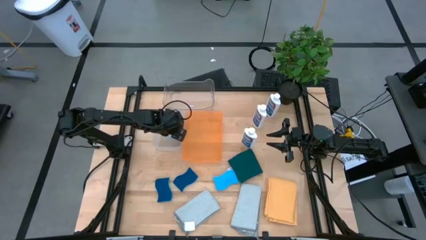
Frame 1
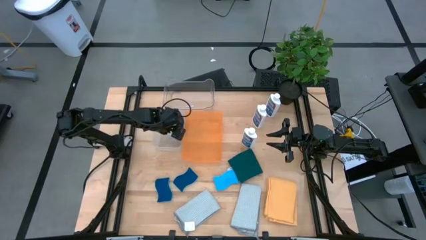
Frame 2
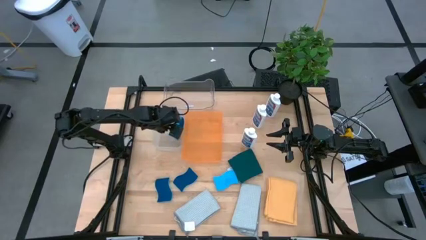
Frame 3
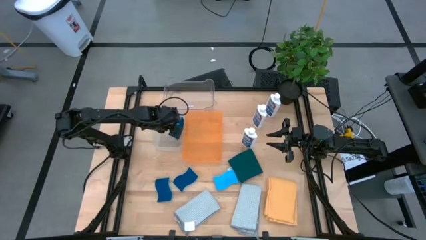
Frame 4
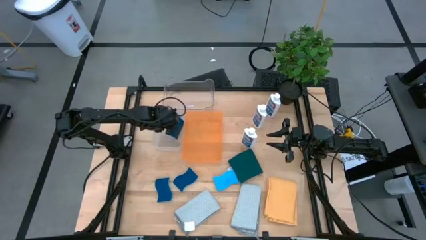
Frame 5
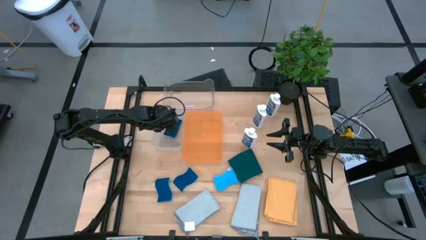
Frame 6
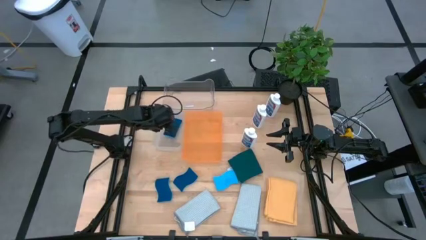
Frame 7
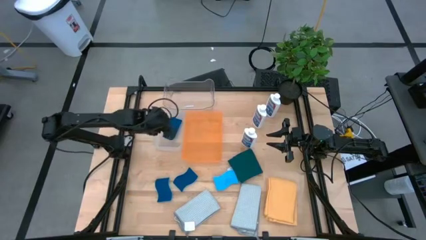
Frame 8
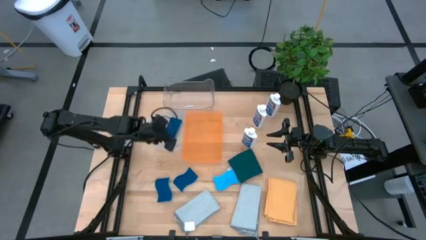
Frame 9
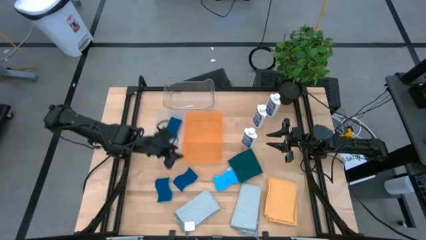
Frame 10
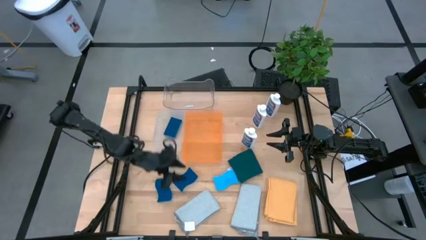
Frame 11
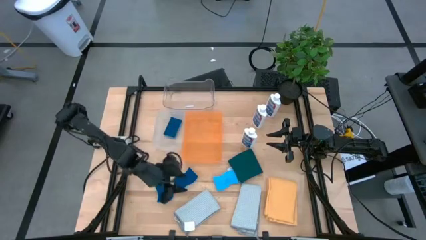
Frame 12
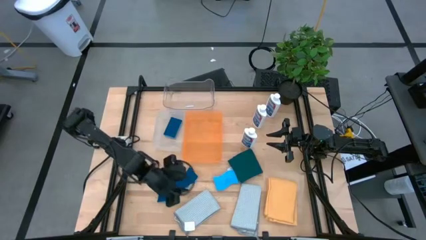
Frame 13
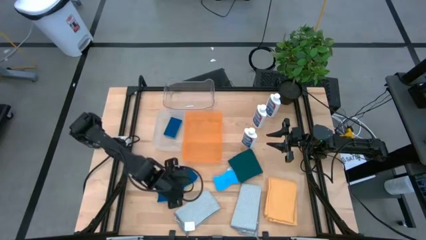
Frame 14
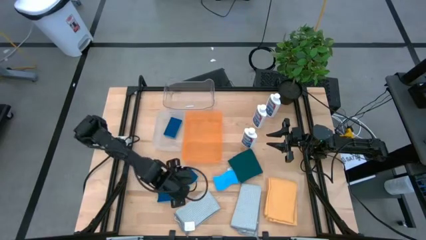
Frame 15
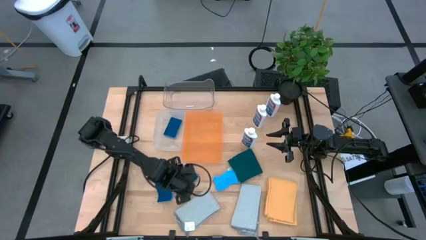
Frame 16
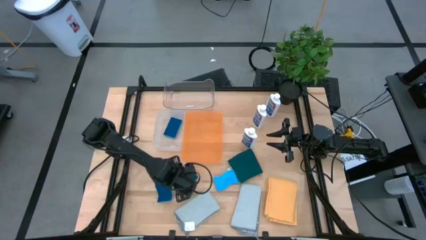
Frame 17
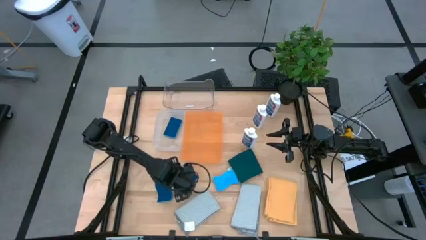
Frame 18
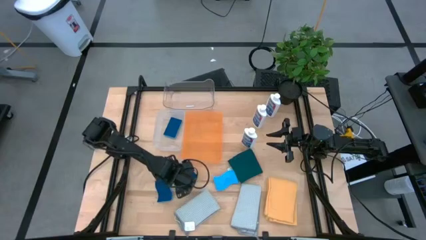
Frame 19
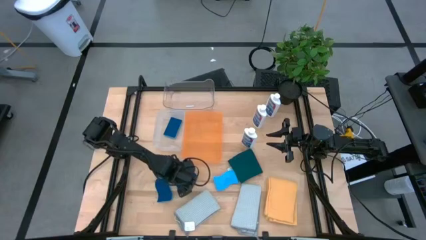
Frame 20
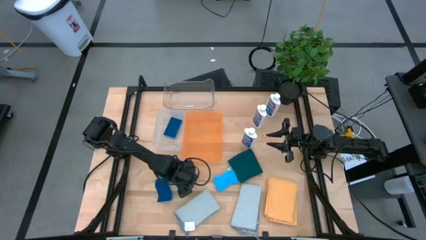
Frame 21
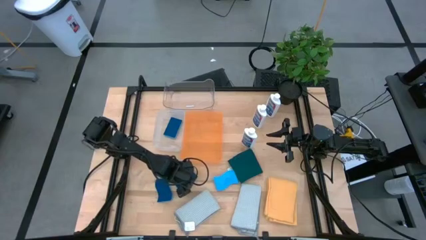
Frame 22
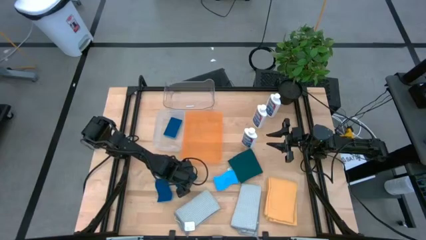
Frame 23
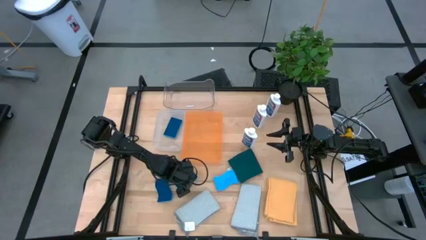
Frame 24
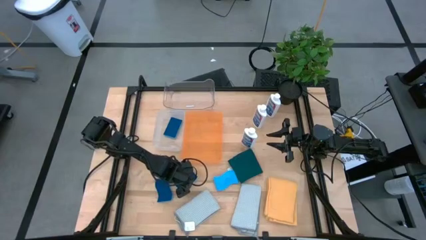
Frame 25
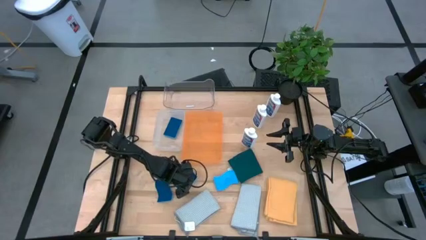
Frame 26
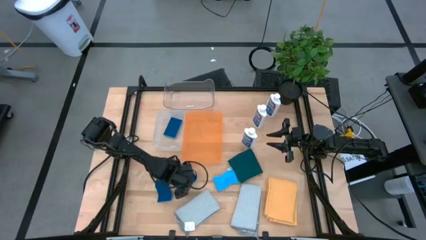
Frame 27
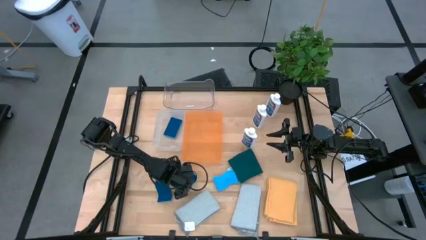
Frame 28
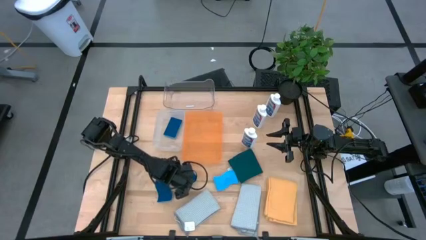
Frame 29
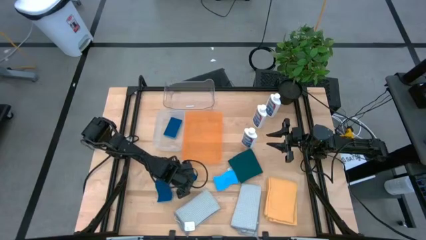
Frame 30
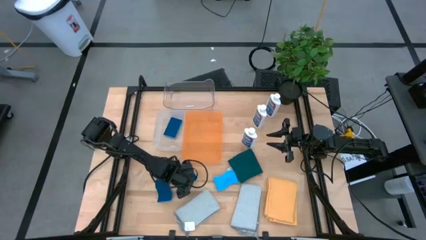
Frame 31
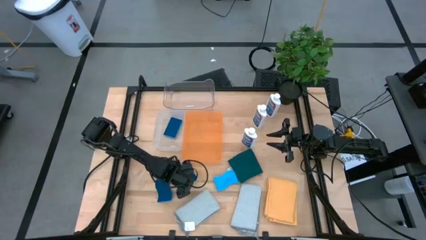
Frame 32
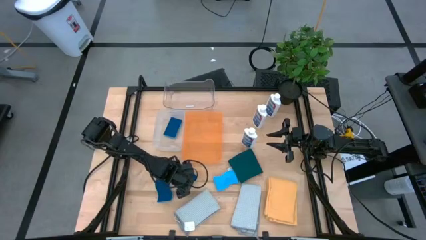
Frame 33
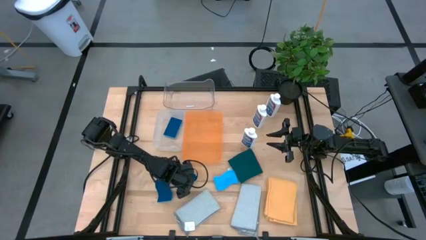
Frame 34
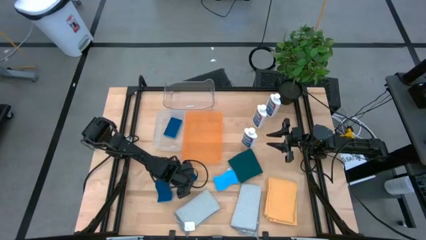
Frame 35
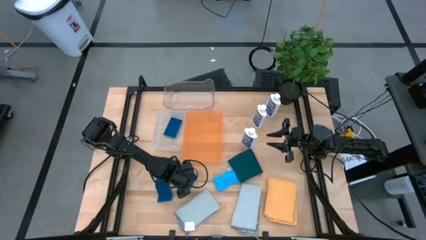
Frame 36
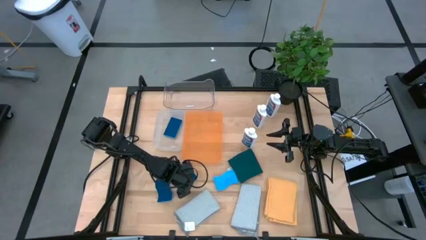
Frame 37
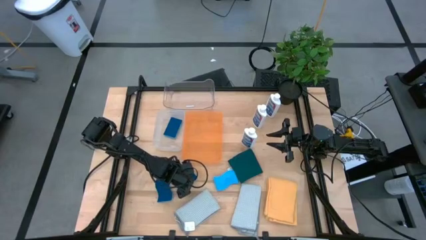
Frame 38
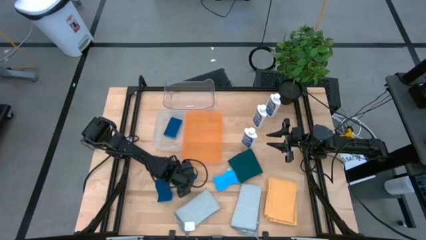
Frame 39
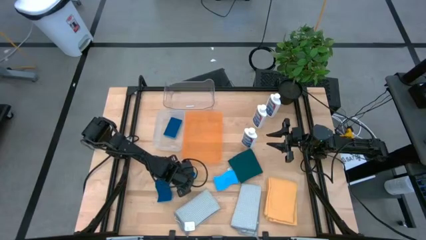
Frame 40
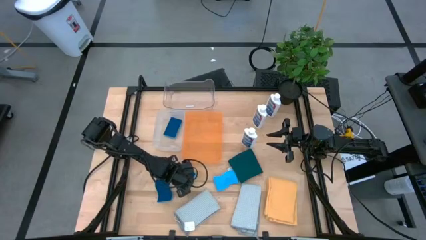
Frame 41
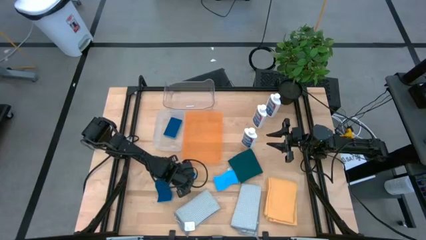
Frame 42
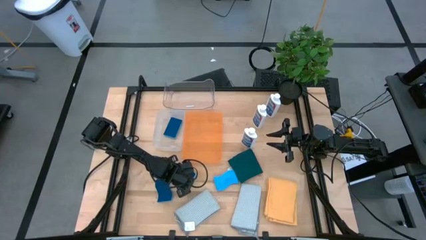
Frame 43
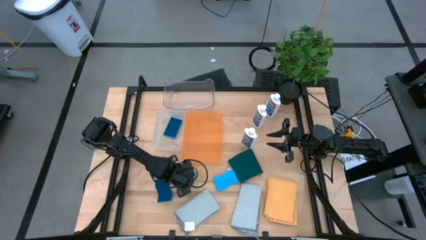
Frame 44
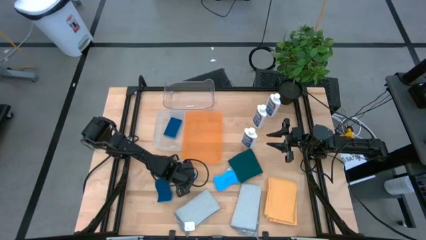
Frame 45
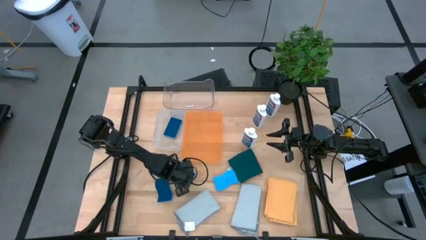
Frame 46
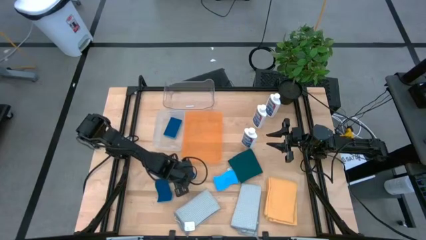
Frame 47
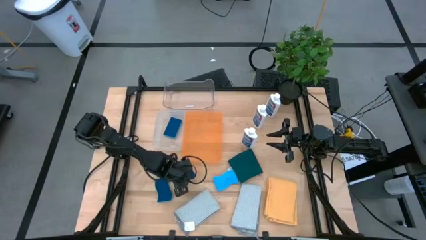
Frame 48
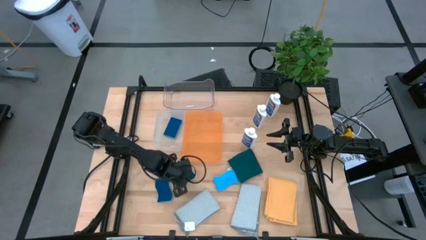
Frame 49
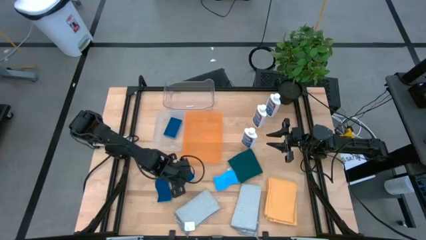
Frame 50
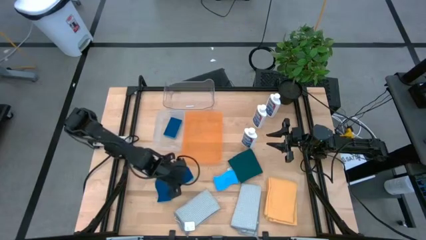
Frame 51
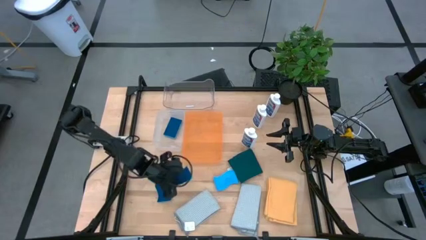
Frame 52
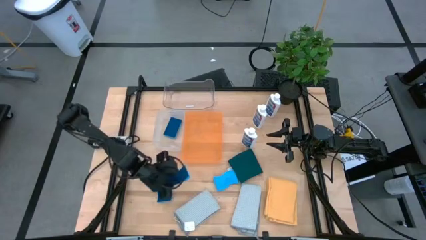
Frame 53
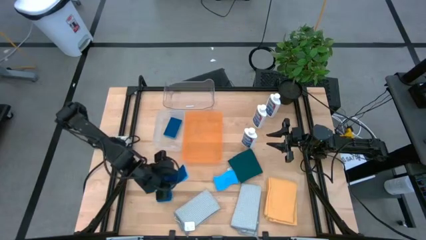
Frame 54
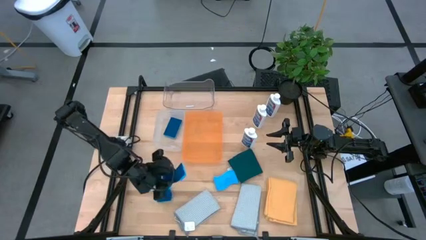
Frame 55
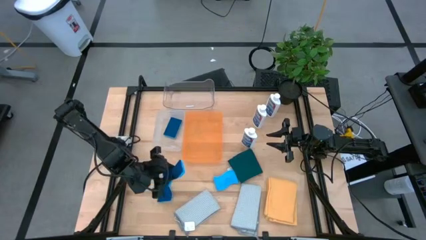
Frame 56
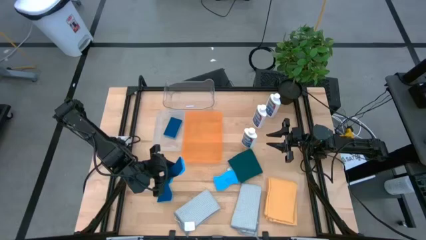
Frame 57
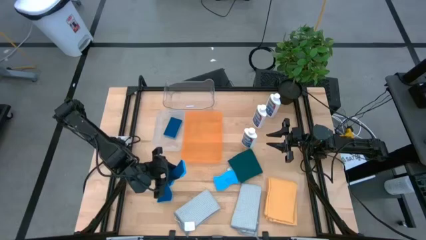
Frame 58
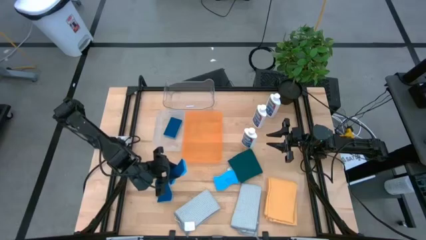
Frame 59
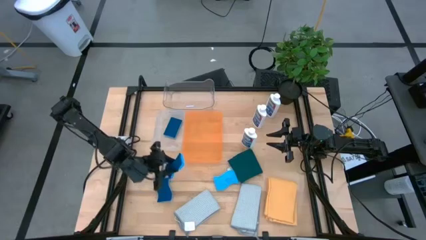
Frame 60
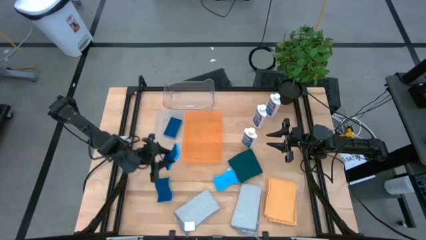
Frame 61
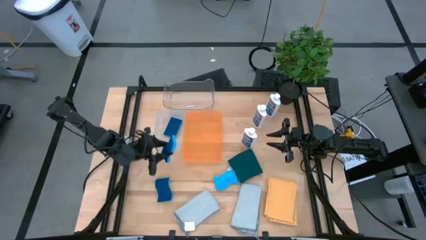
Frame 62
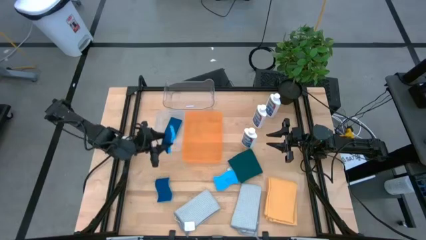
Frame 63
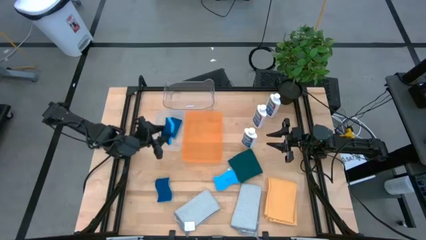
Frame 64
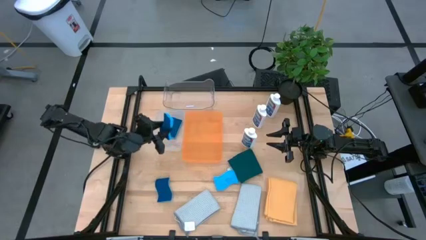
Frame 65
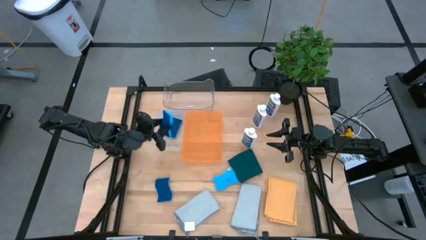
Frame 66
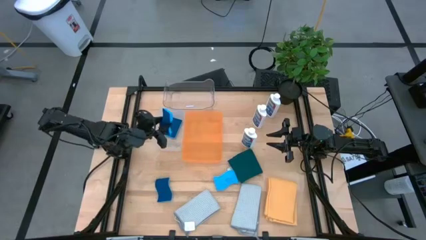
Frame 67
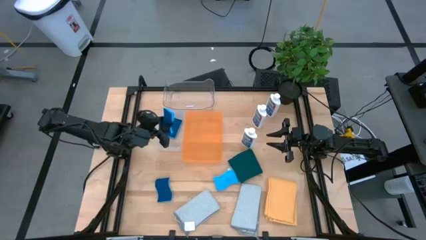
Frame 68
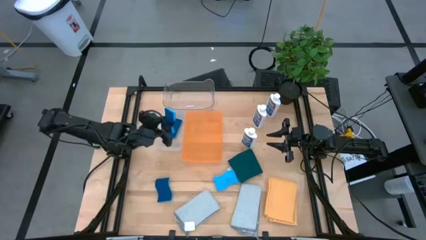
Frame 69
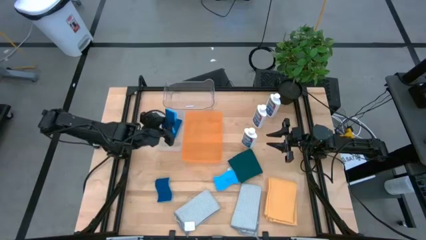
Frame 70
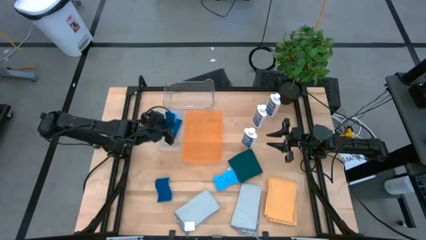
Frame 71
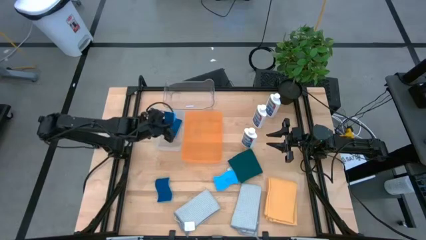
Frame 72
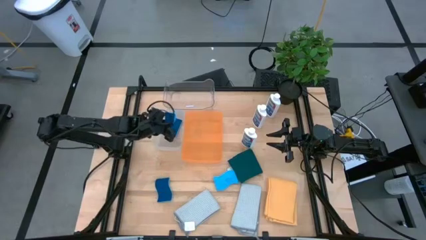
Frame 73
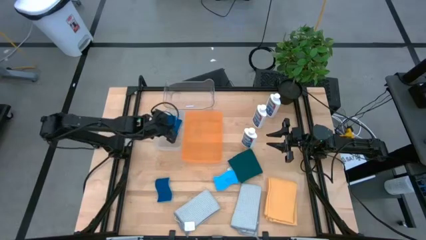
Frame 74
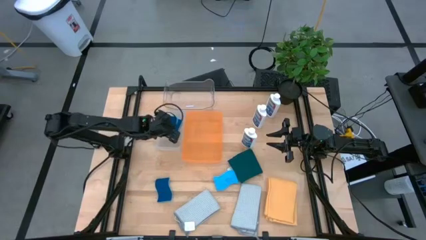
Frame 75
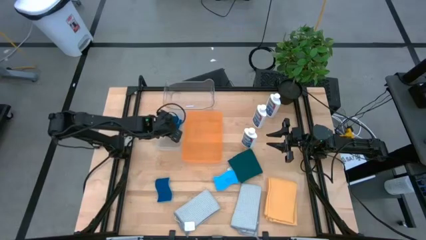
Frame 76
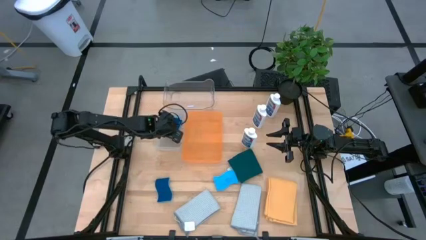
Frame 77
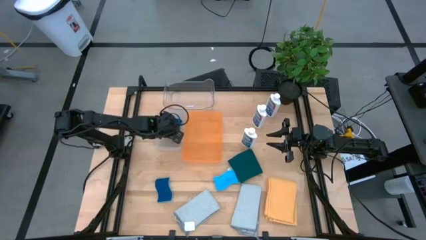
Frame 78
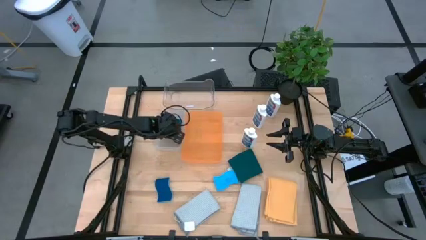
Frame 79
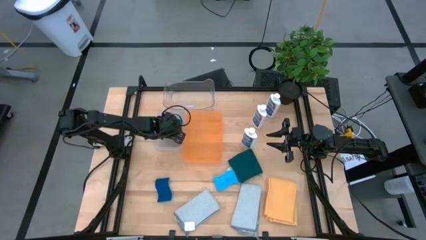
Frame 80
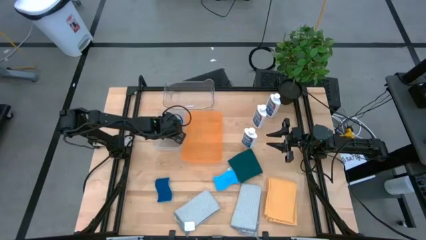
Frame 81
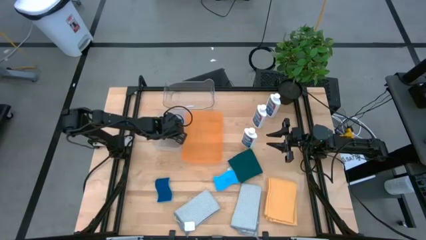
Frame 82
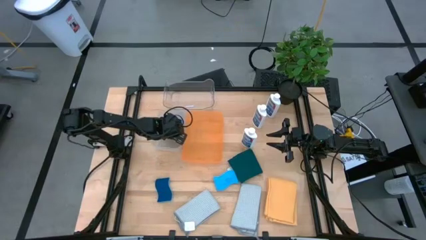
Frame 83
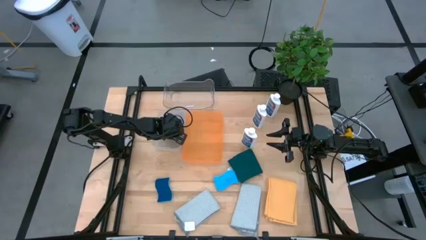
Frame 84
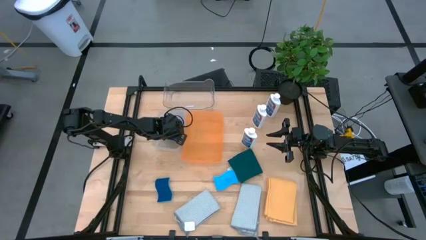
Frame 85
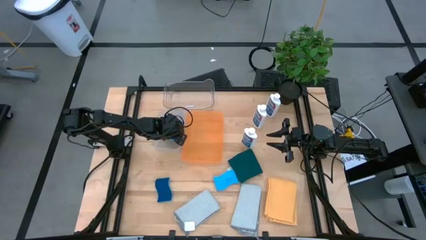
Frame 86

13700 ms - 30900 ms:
Task: Pick & Place Kitchen Items
Put the sponge into the white bin
